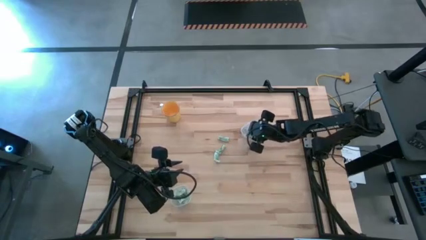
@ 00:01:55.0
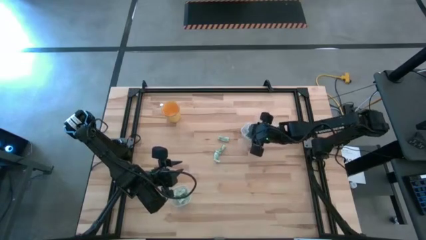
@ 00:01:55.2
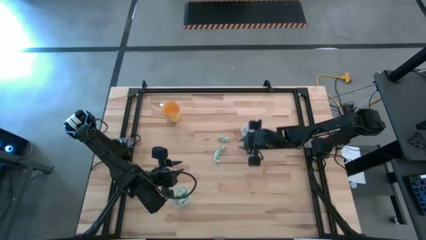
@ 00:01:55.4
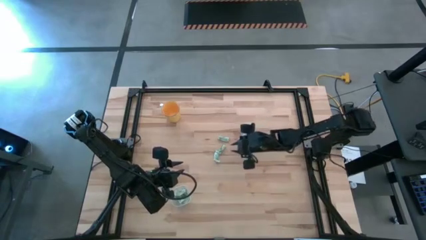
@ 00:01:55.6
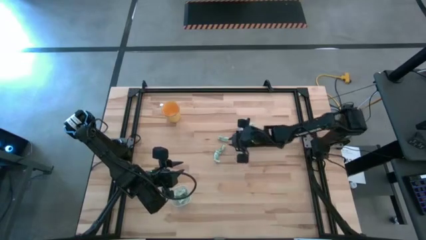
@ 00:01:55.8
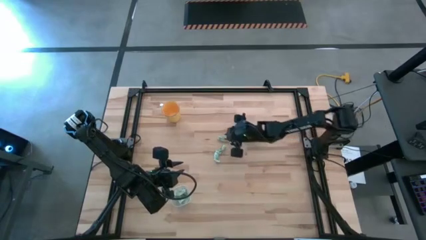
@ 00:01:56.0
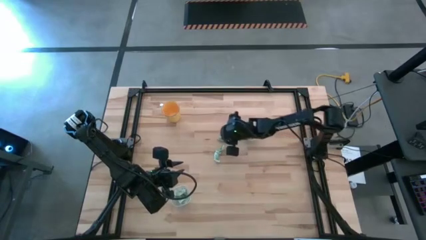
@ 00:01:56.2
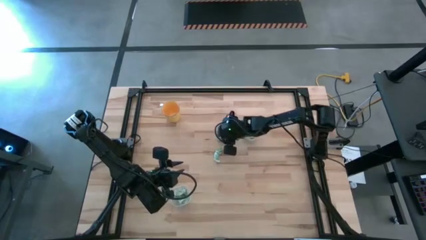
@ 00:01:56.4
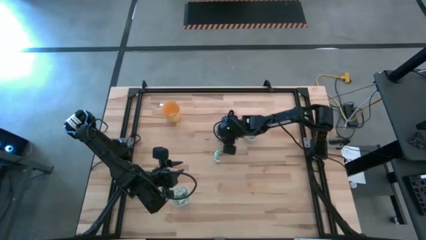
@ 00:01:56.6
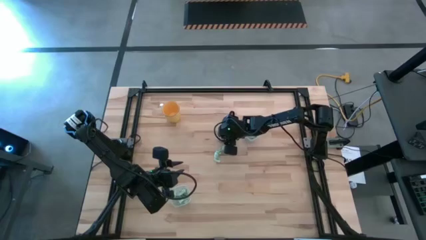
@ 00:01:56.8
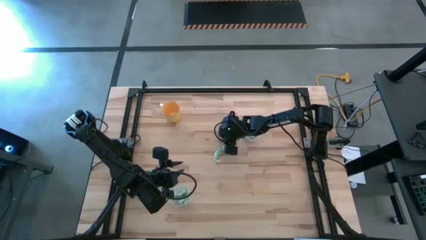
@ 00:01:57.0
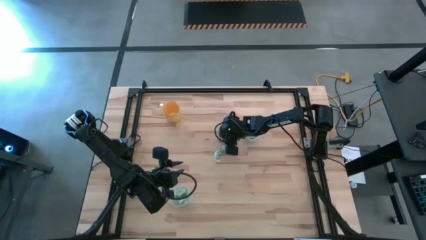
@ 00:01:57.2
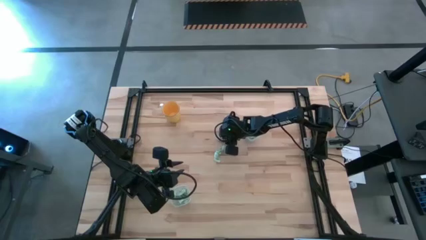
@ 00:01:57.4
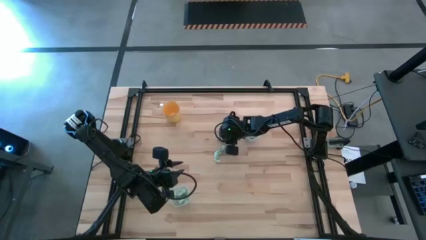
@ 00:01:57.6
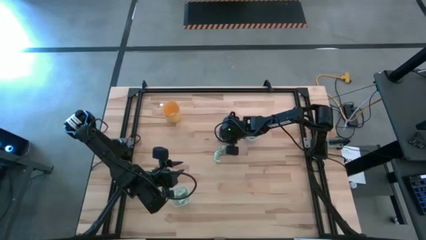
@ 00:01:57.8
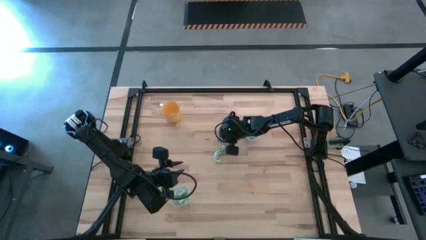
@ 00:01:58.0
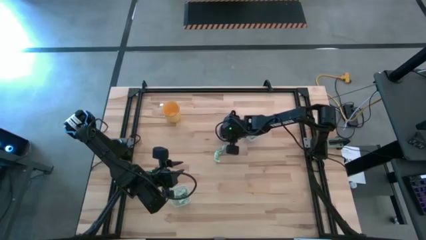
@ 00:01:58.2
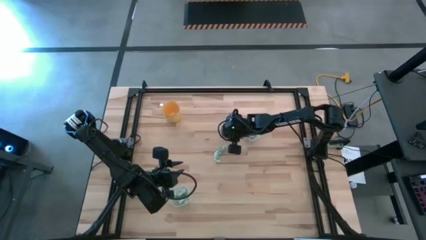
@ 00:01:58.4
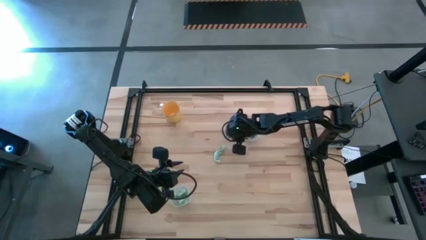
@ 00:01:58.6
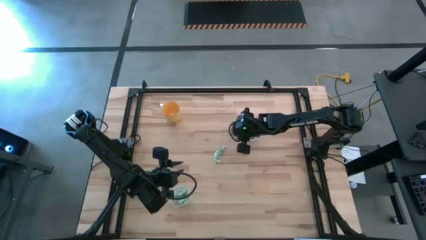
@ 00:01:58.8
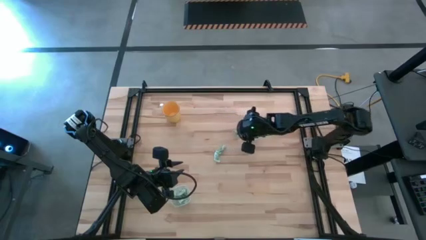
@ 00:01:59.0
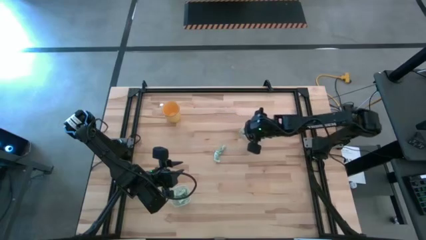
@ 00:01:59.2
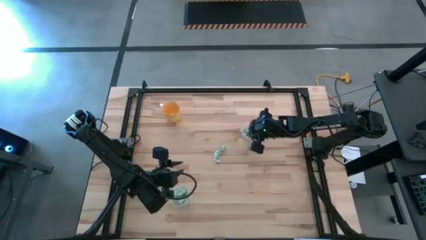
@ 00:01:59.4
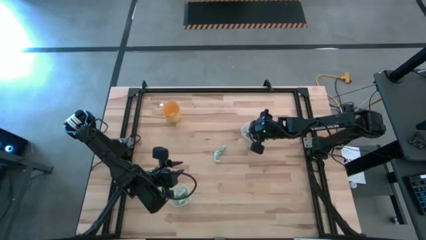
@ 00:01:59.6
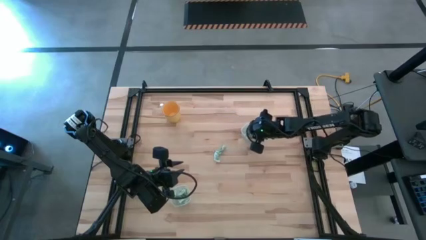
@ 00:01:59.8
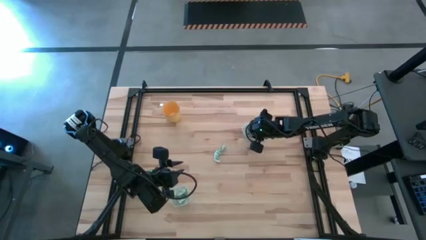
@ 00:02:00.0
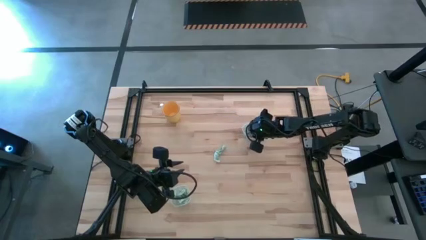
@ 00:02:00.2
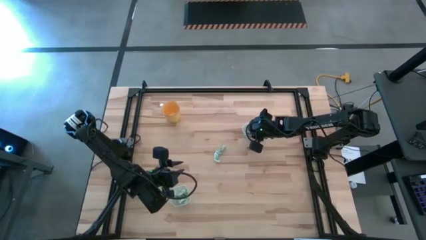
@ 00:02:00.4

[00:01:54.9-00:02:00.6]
Task: Pick and place Stevia / Truvia into bins
Put the green stevia packet into the top transparent container

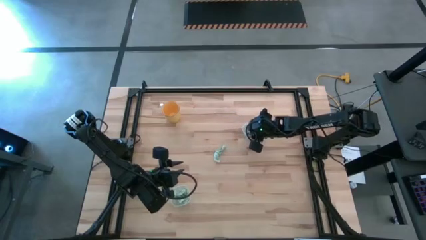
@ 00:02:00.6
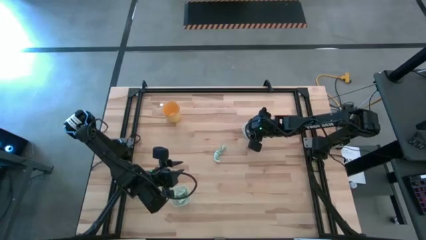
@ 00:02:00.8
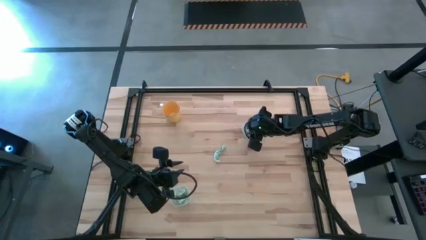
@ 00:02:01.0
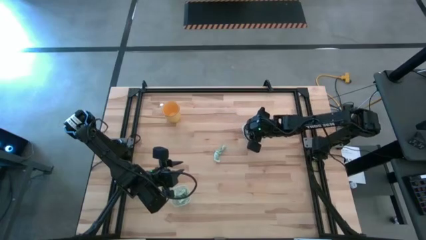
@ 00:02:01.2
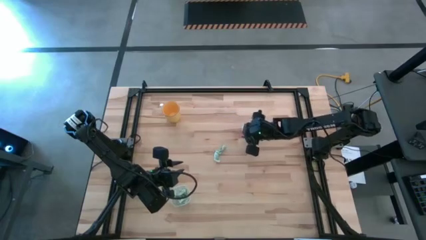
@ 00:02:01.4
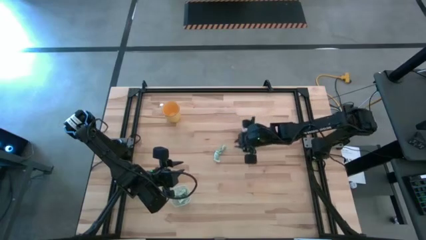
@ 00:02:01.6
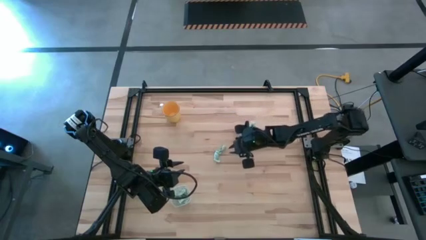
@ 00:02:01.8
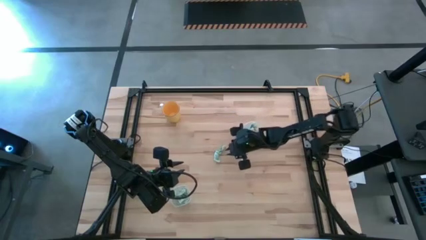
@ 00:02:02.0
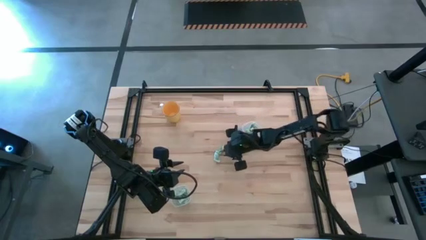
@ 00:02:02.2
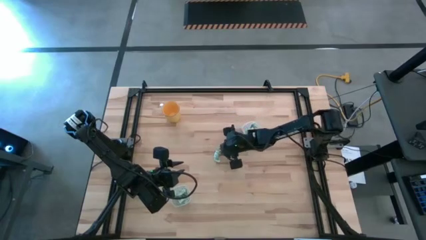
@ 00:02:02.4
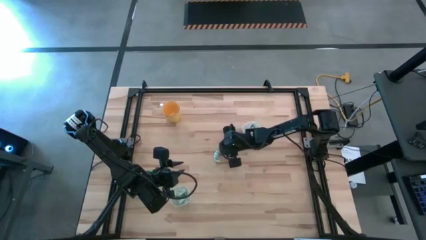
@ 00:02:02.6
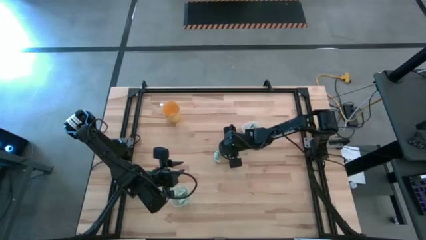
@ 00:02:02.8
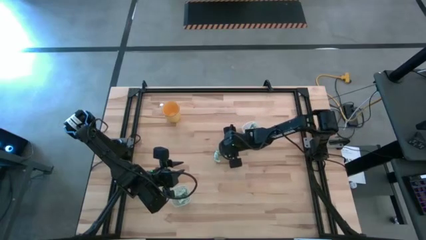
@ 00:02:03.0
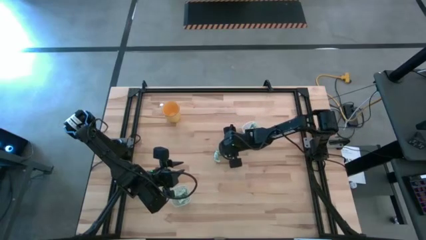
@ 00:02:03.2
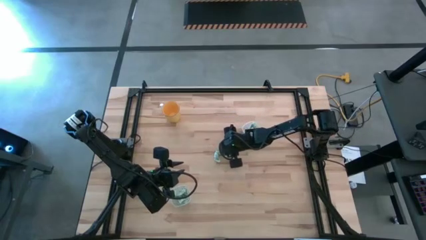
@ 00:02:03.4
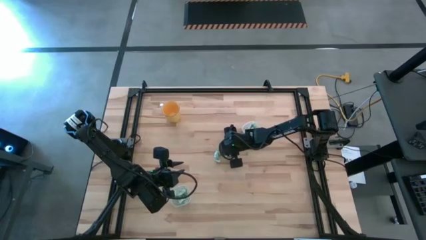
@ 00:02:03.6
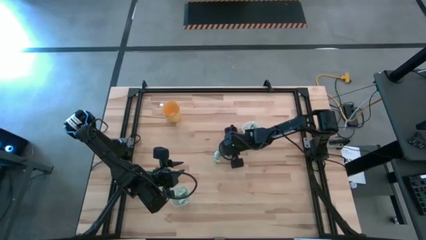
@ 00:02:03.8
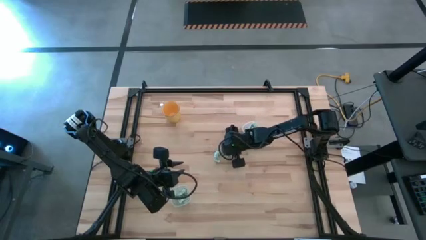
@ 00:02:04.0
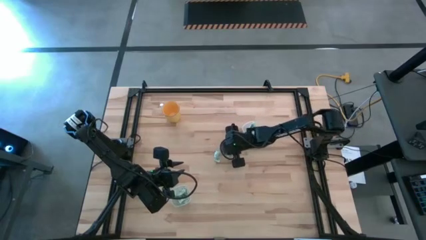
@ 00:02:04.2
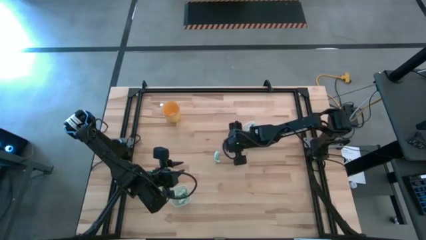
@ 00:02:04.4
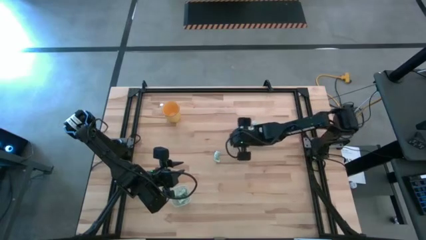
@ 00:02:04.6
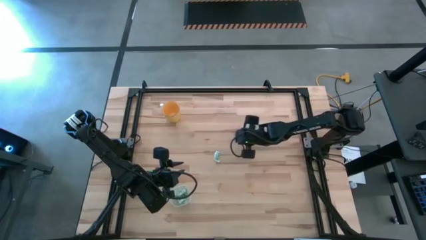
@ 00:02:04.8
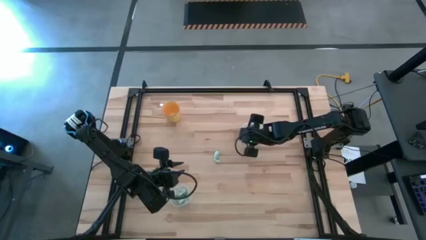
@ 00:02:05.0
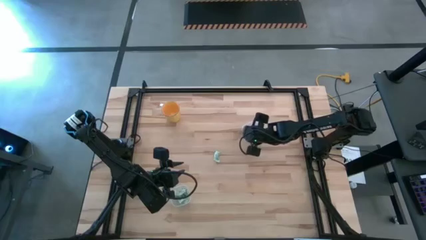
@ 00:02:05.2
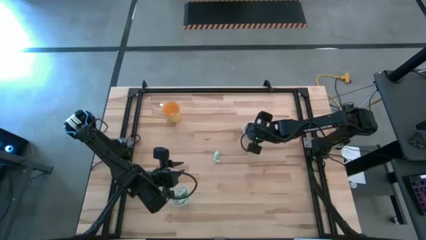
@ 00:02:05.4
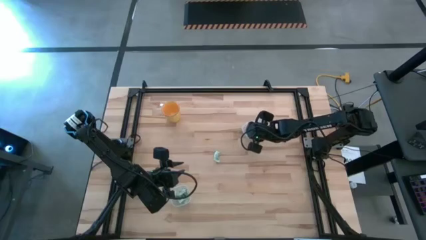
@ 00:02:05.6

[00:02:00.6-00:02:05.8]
Put the green stevia packet into the top transparent container

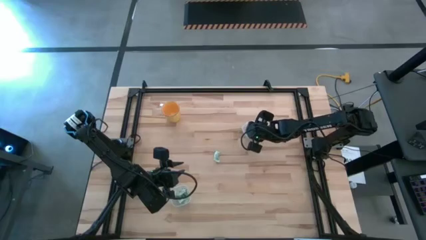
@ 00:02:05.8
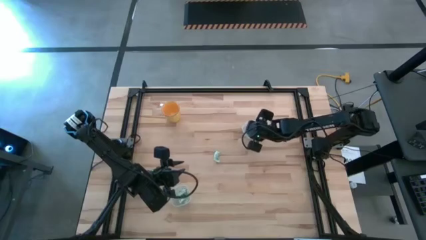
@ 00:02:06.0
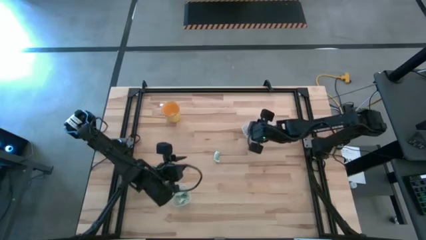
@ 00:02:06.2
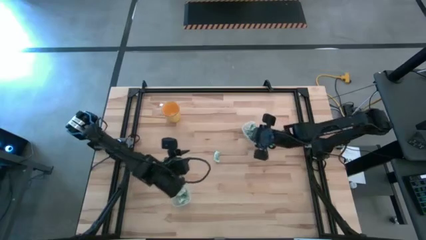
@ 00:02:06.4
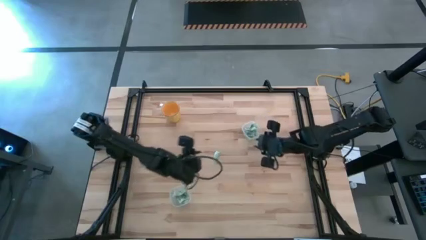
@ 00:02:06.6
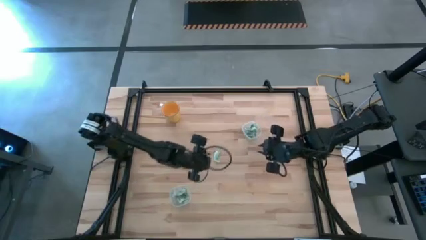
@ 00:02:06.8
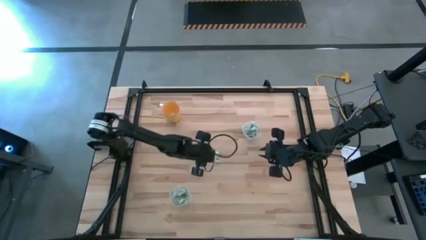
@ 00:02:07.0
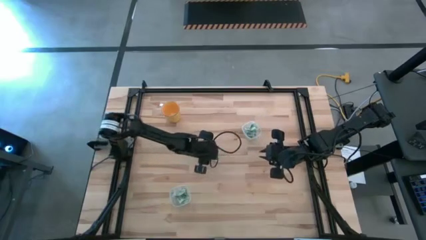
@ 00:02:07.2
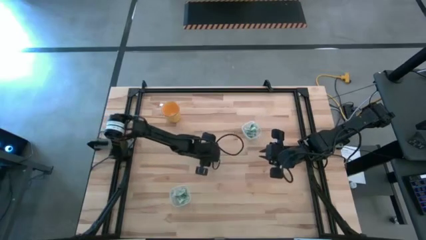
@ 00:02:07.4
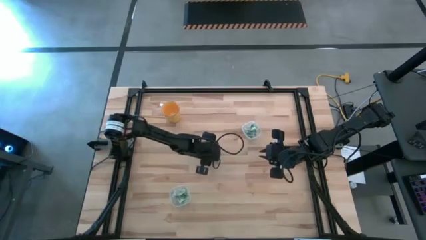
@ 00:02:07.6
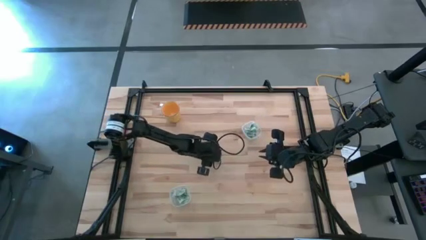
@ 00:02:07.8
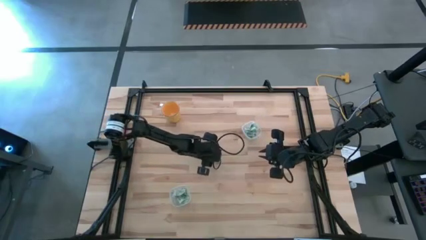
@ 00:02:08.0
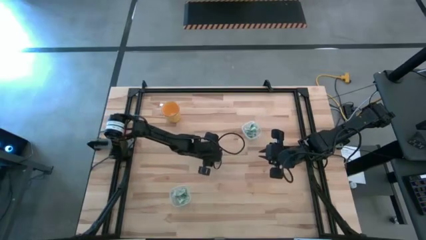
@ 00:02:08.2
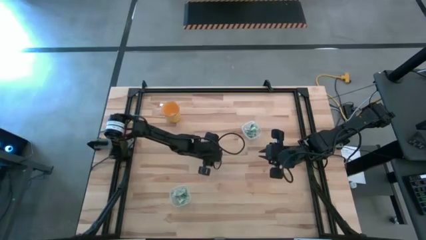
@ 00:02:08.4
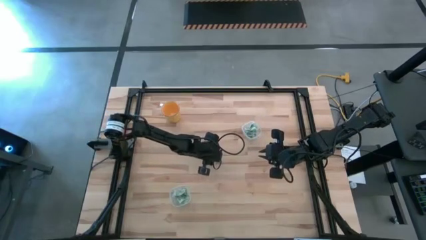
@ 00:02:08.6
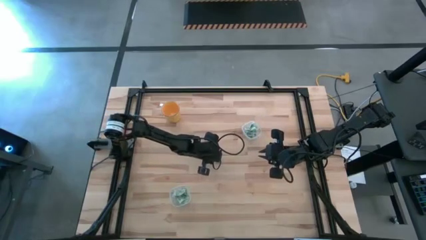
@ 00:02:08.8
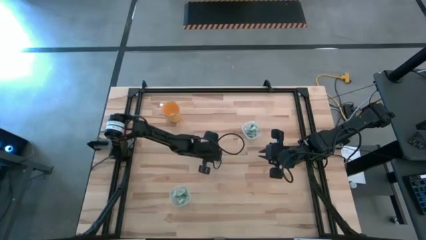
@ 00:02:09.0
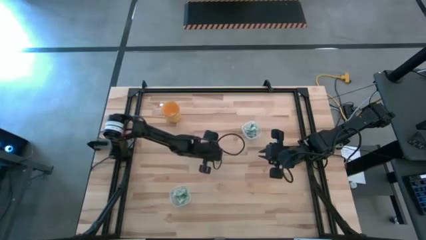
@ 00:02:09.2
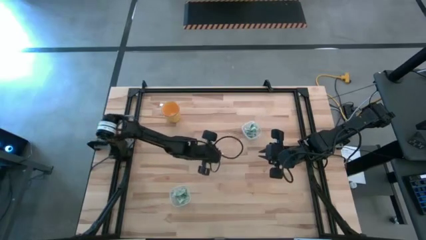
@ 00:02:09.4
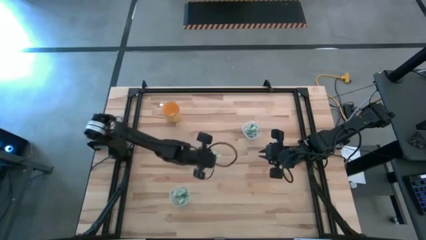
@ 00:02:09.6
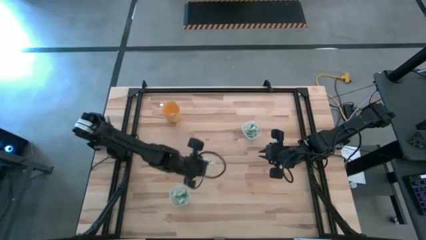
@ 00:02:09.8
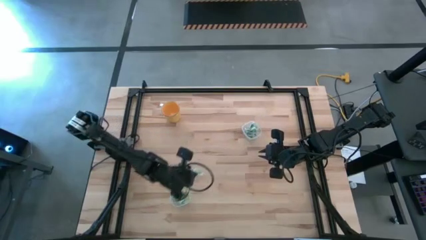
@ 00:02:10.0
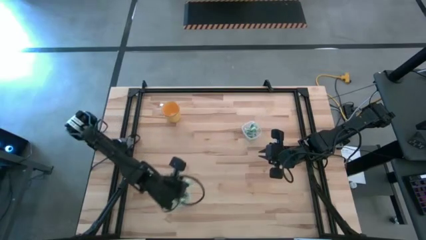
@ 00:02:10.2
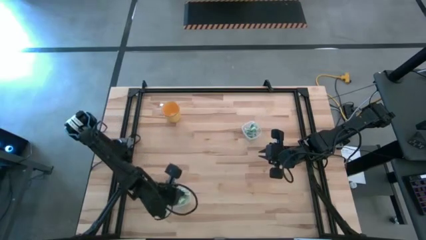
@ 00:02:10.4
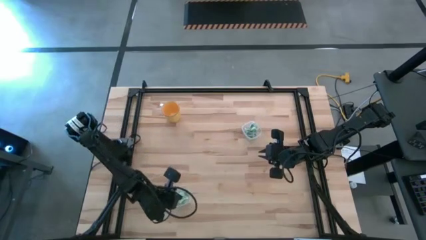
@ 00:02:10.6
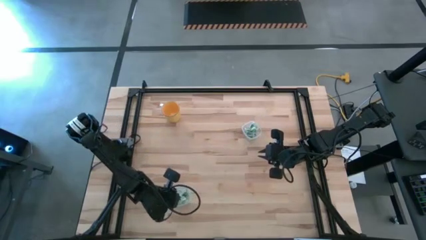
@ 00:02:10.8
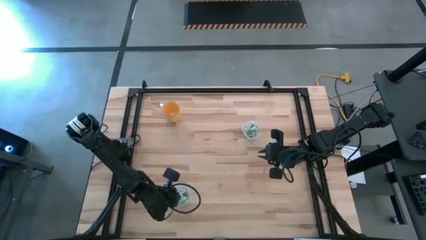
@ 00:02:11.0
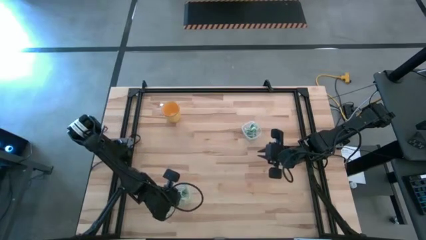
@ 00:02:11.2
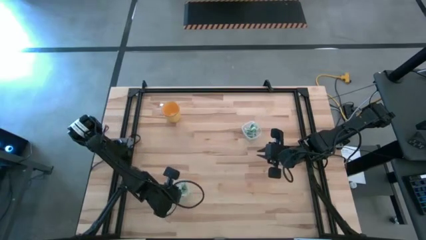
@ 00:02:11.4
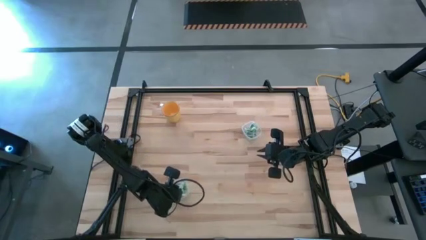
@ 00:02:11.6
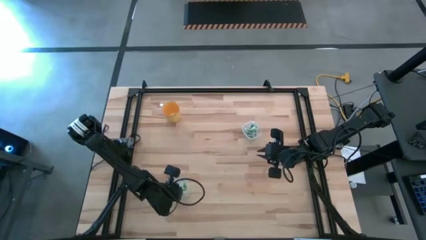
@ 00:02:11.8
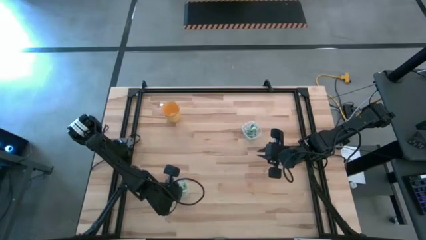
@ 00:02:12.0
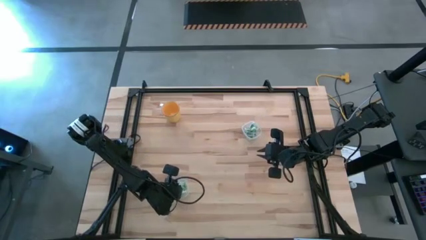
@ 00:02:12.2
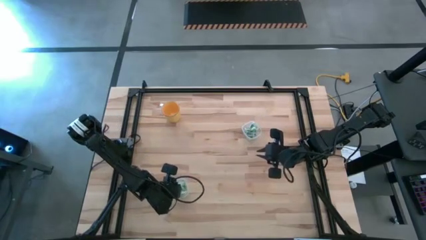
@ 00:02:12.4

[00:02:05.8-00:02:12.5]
Put the green stevia packet into the bottom transparent container
